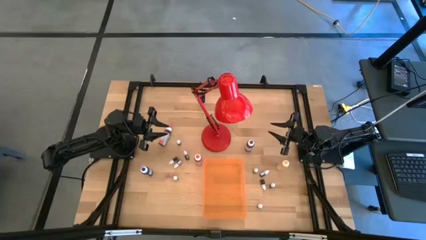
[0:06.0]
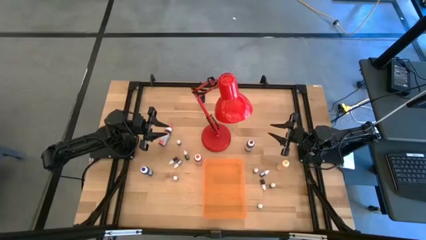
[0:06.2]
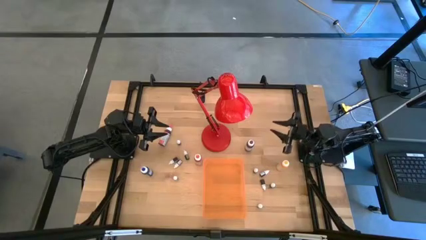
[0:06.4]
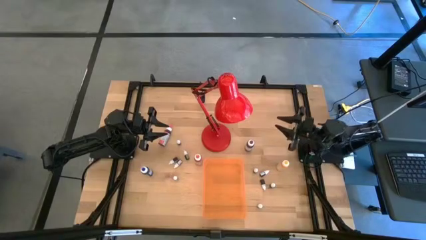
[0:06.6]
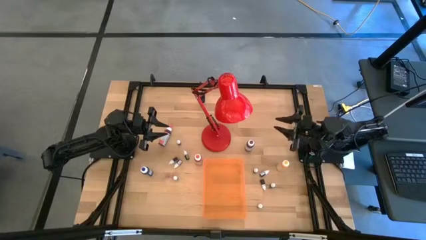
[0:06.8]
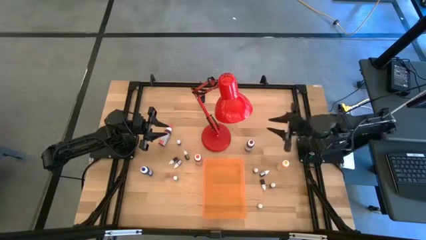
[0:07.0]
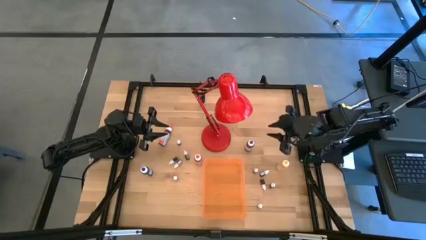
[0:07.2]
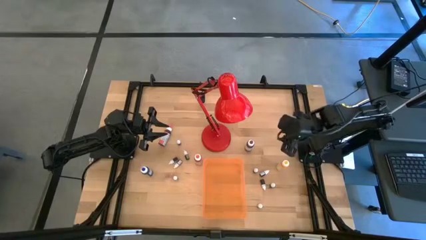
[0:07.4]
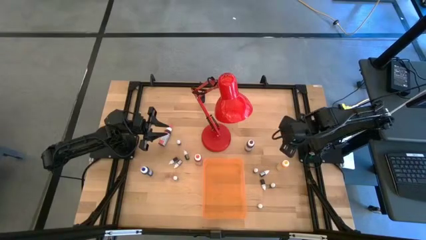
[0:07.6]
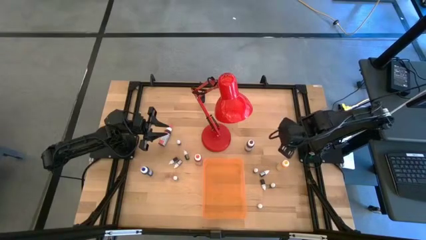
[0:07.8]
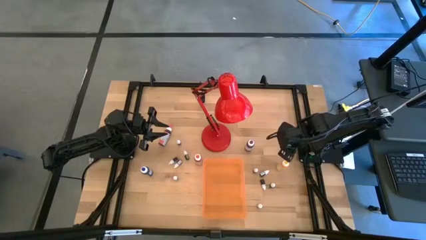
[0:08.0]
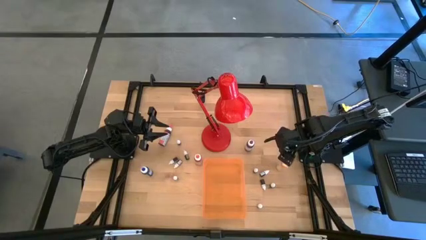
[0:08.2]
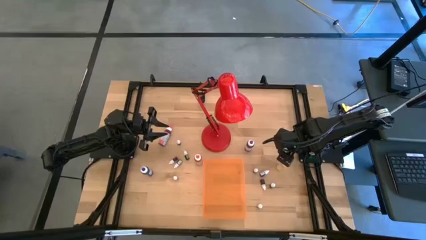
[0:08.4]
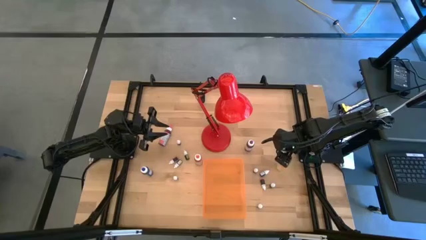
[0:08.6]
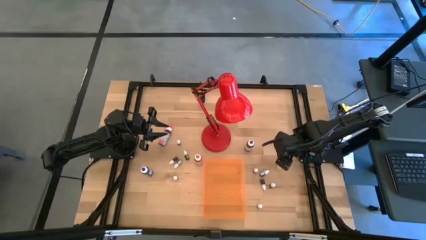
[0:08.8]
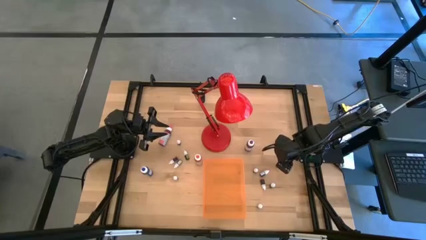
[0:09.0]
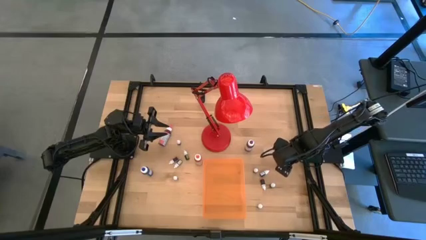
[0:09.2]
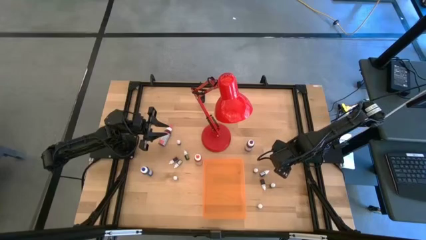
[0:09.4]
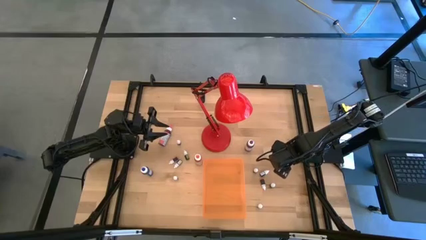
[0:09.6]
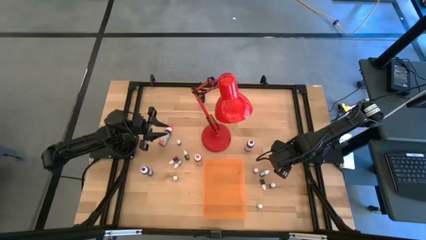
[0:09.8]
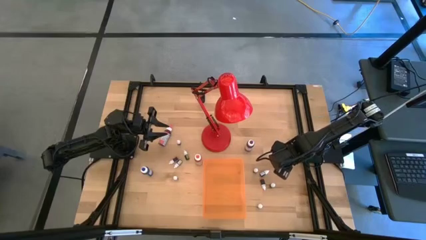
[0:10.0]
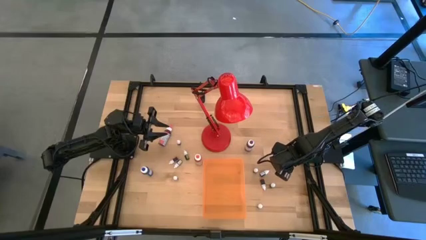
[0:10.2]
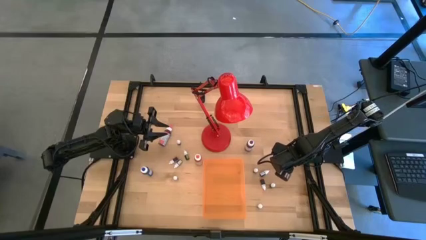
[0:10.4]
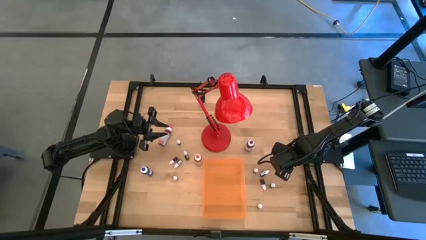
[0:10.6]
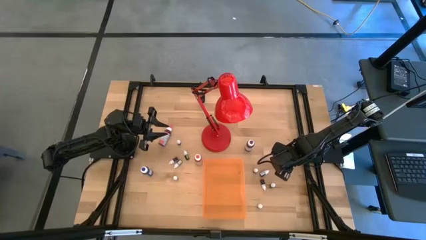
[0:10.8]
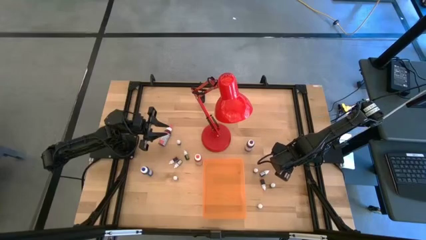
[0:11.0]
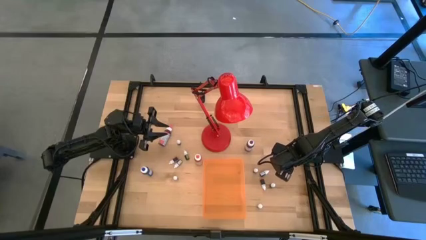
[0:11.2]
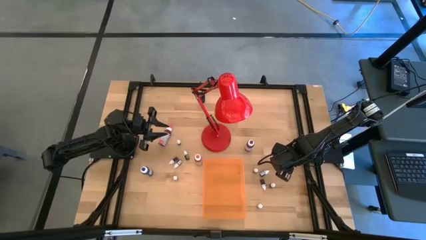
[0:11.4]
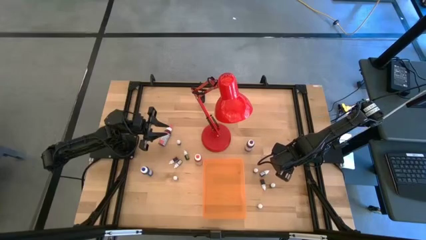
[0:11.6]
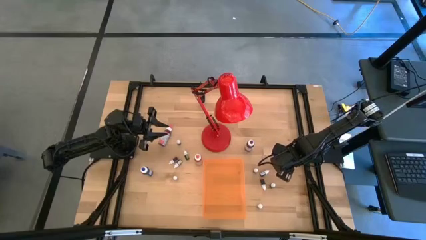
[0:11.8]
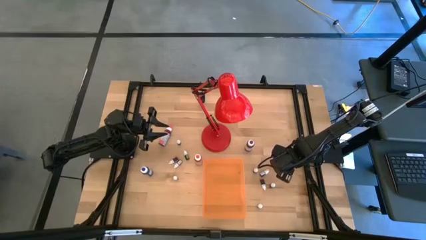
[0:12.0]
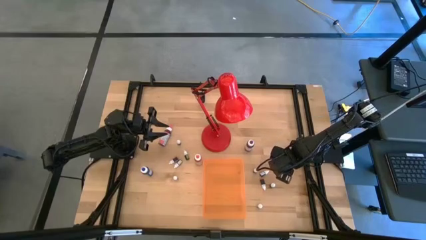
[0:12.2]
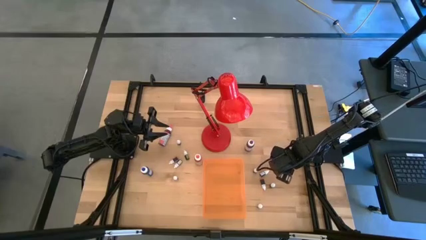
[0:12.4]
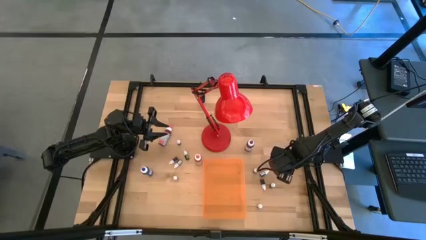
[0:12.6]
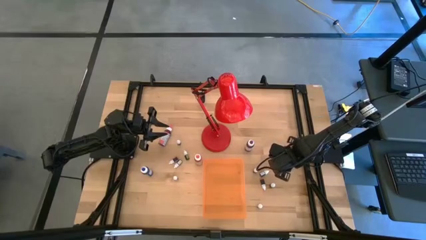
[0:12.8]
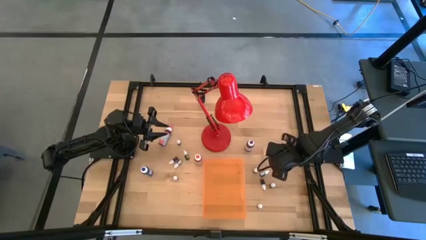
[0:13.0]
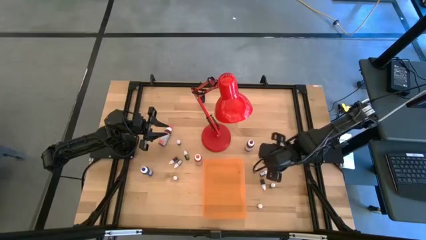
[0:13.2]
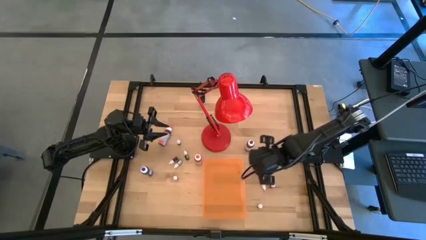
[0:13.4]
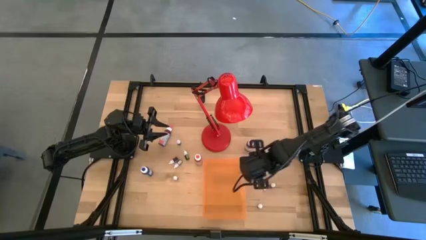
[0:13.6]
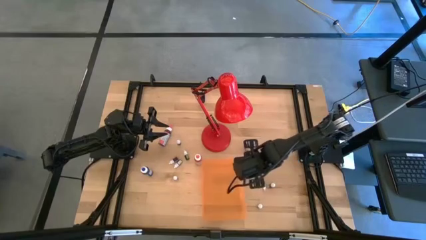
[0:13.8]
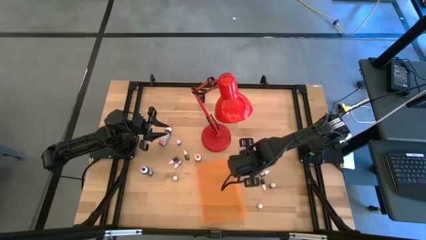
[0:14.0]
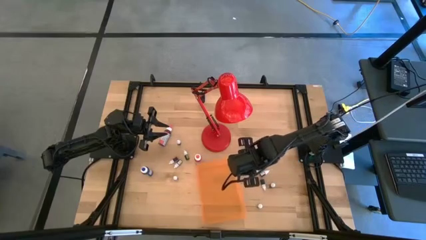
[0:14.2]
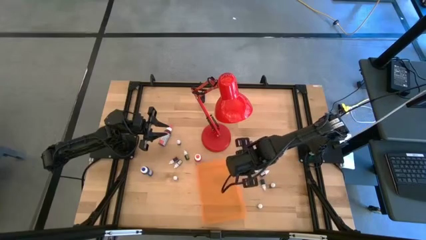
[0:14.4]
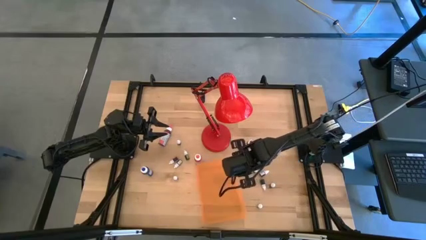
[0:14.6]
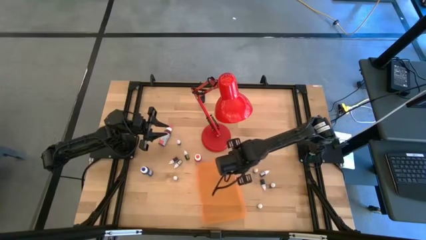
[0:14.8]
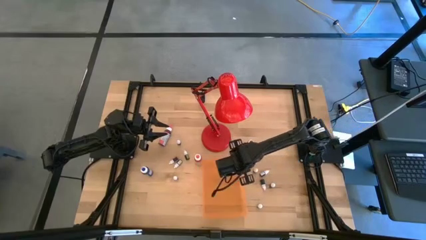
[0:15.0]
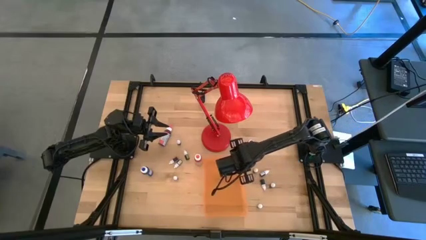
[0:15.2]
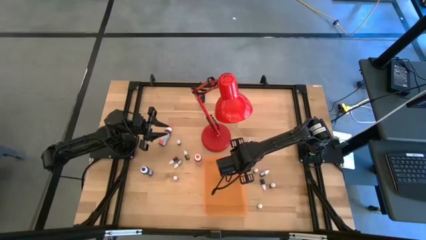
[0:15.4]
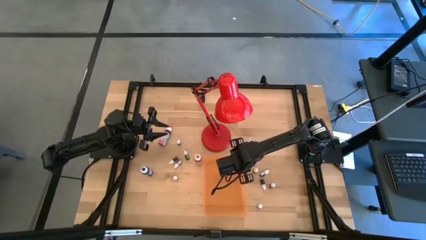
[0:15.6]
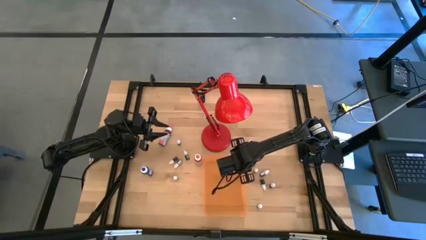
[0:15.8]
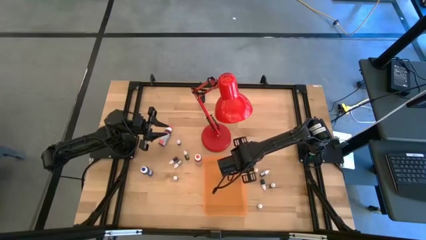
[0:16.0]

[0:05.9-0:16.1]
Task: Pick & Place food coloring
Put the large yellow food coloring bottle into the orange bin

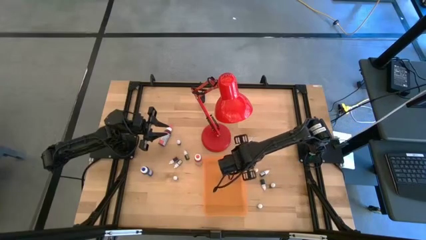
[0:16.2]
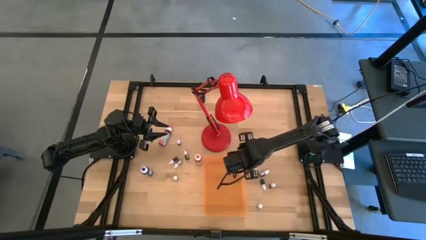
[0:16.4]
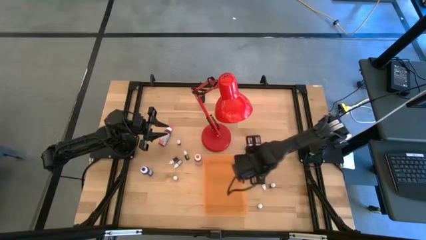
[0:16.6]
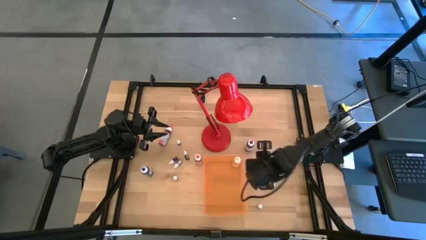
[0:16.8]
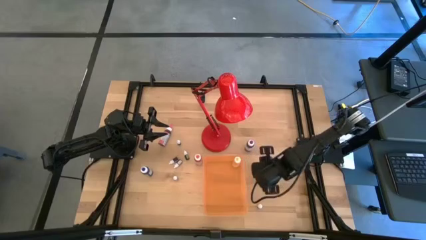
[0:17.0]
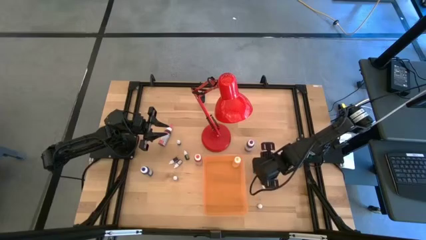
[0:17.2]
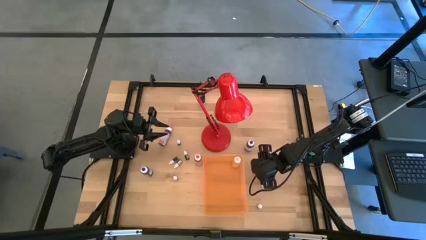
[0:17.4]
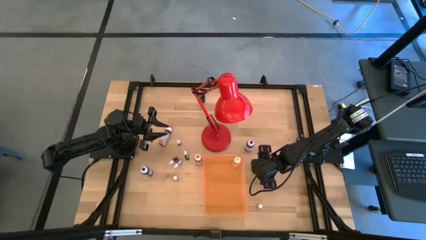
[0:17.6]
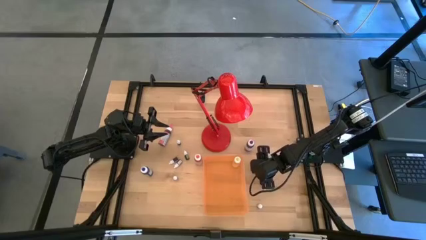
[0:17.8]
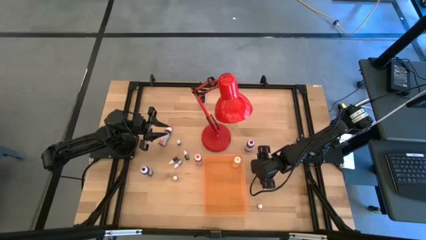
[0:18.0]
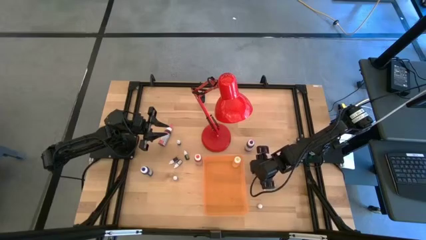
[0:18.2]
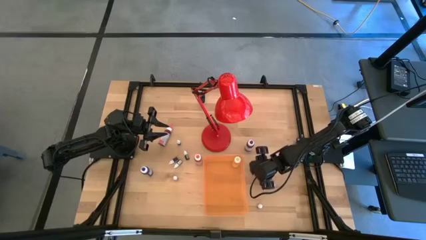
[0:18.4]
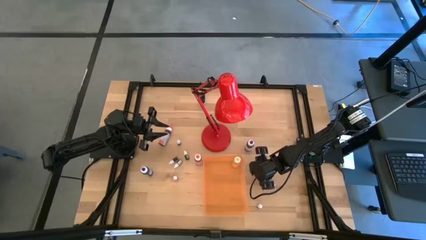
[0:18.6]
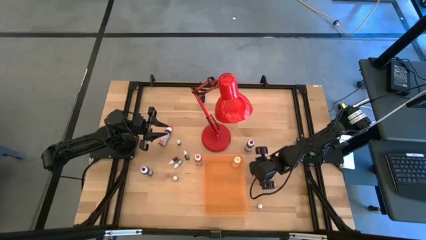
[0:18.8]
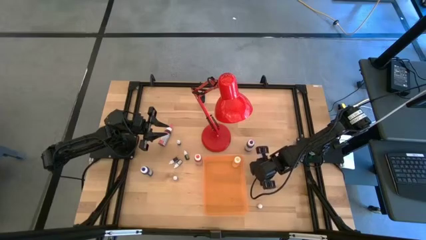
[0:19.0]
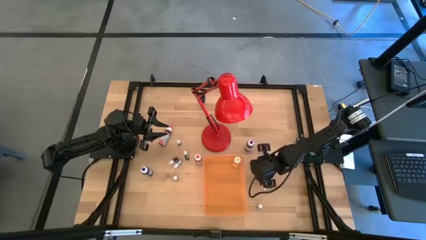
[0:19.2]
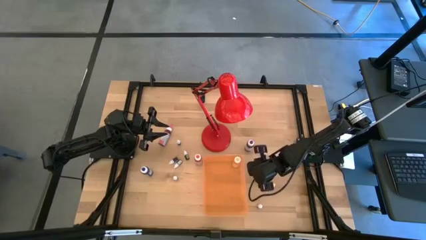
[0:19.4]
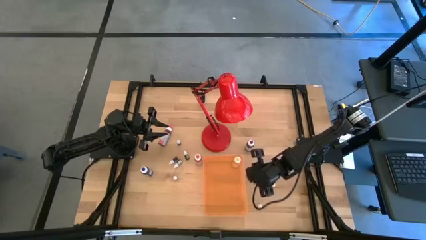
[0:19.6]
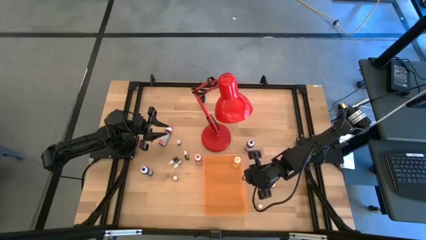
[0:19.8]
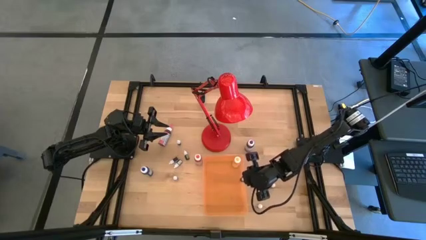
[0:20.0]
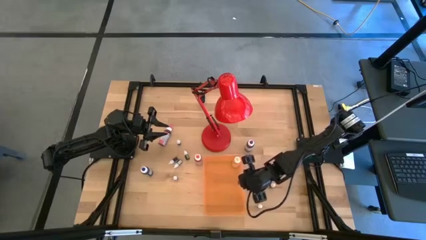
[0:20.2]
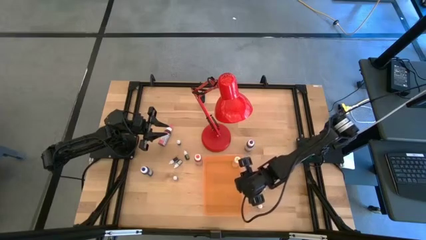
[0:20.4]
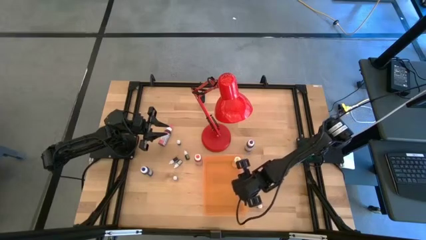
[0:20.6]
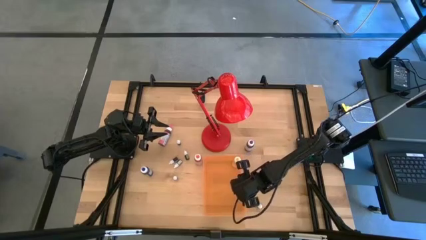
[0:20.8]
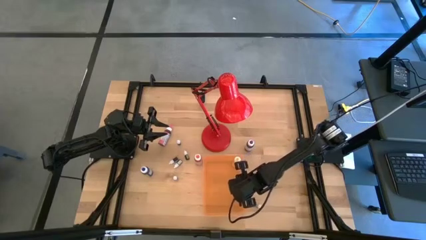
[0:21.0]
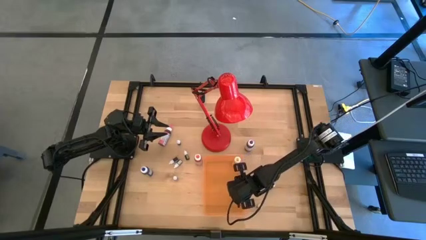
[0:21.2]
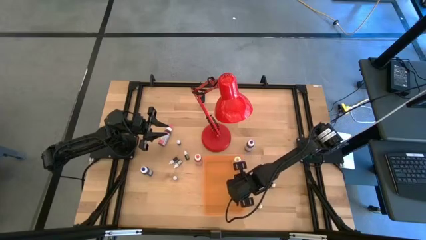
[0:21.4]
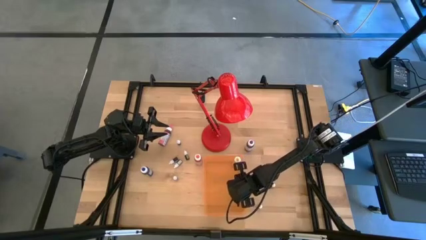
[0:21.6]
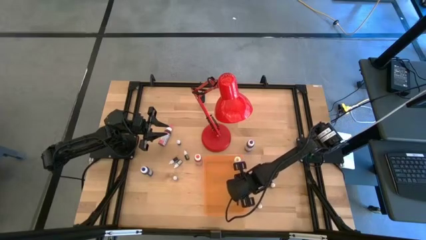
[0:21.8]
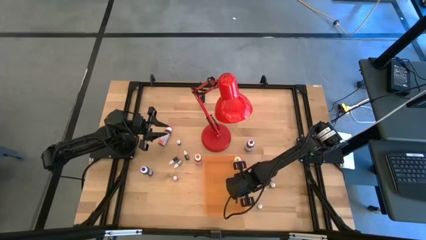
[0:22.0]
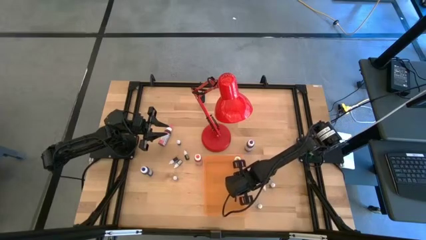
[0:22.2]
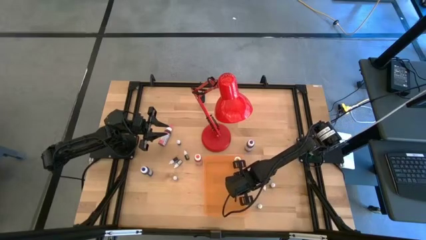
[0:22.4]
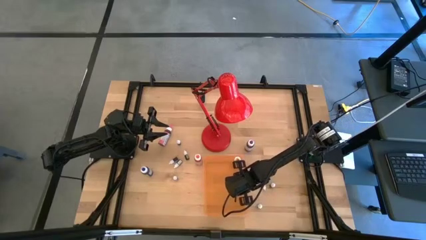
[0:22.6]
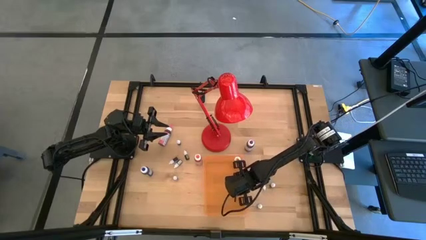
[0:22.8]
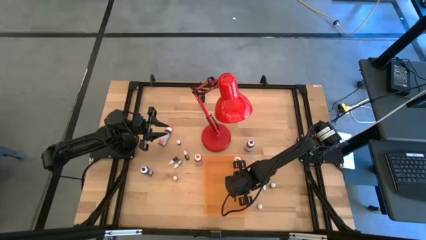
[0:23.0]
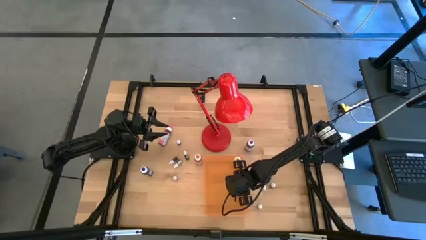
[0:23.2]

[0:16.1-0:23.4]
Put the small light blue food coloring bottle into the orange bin
